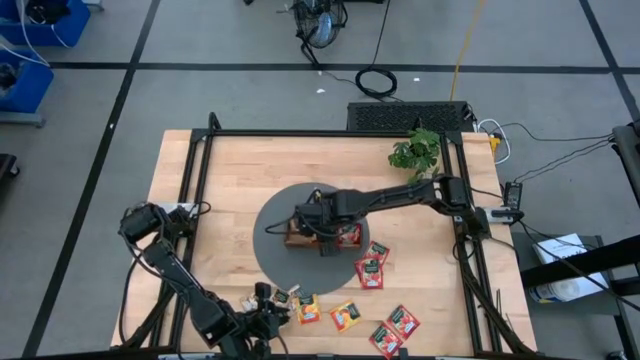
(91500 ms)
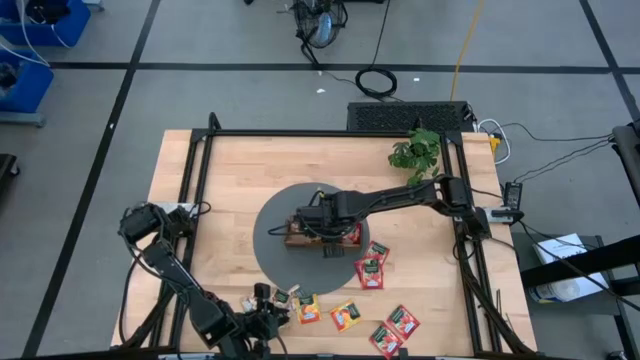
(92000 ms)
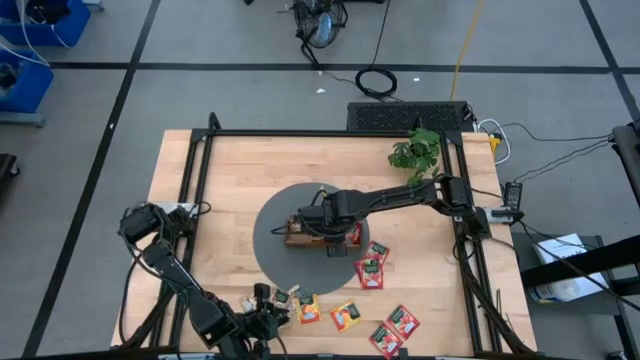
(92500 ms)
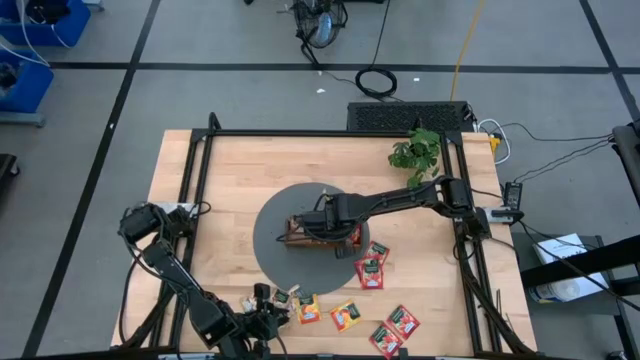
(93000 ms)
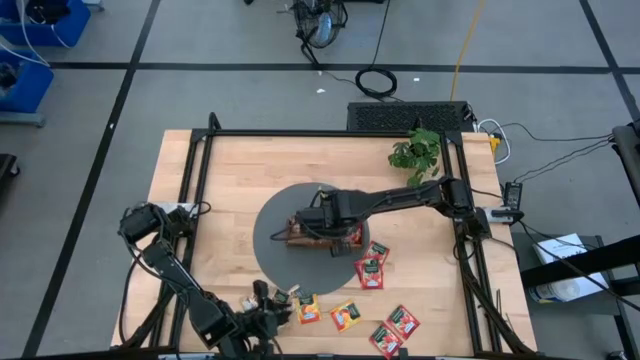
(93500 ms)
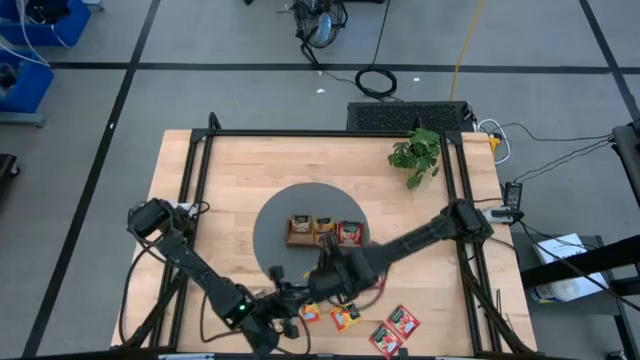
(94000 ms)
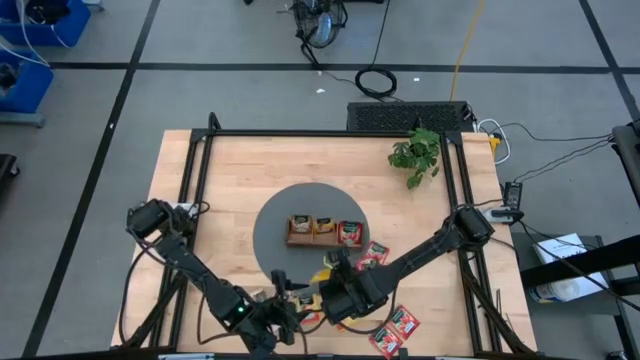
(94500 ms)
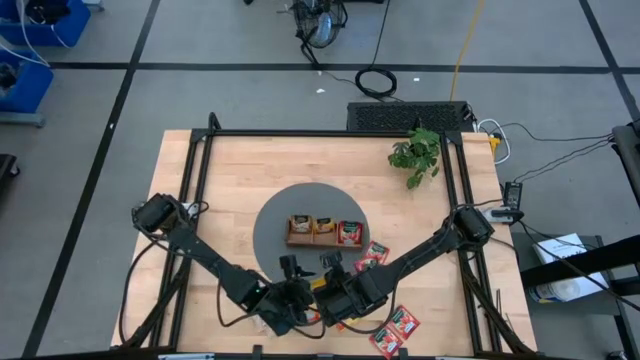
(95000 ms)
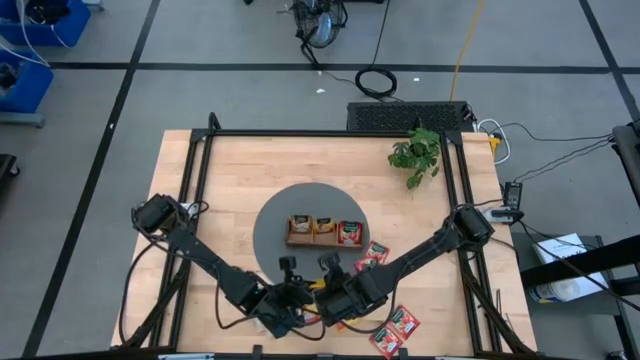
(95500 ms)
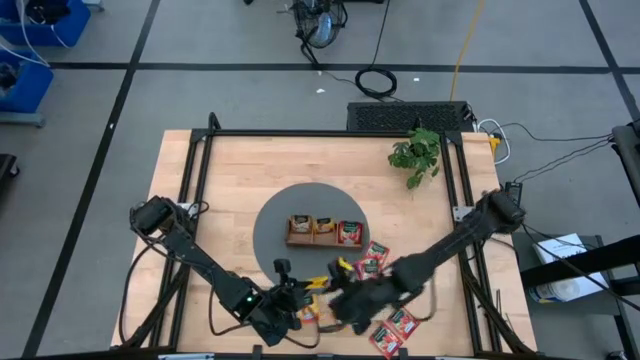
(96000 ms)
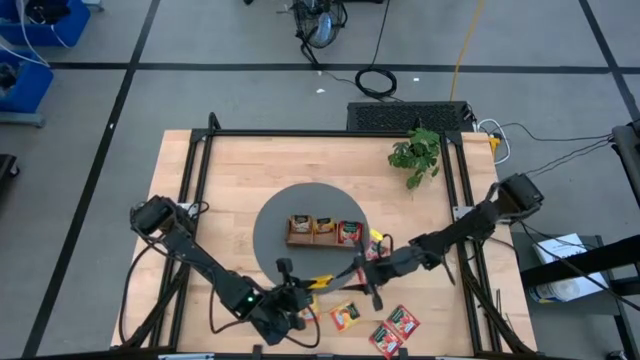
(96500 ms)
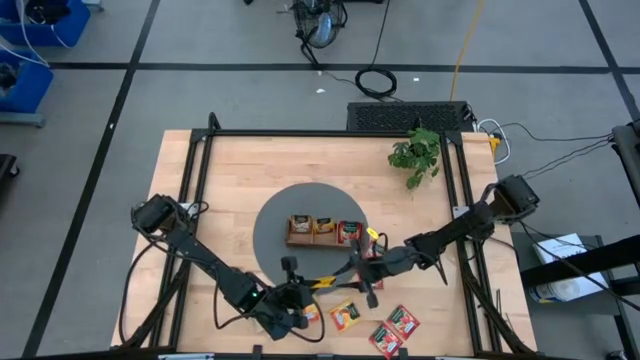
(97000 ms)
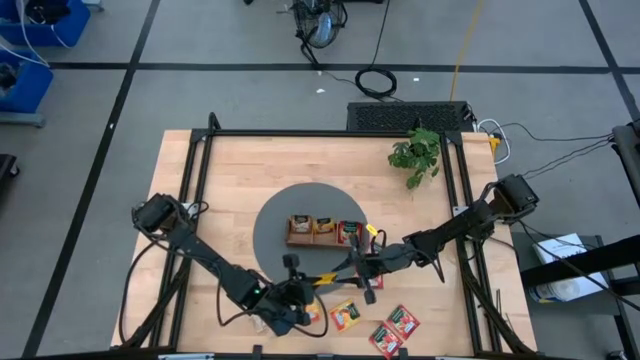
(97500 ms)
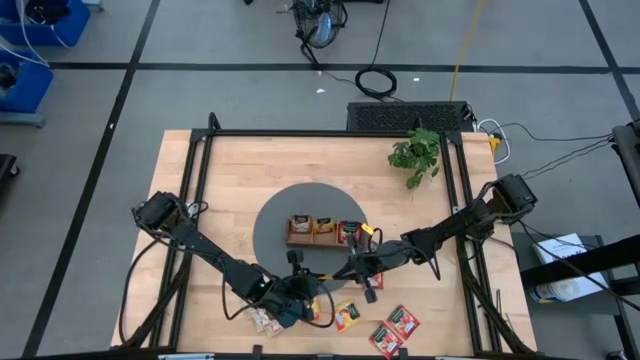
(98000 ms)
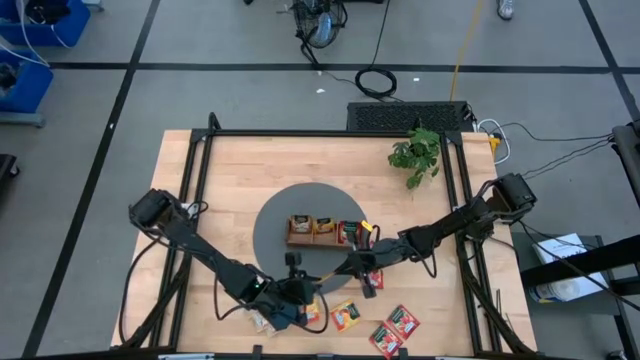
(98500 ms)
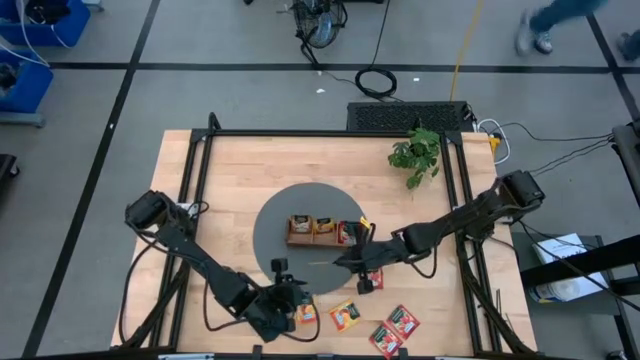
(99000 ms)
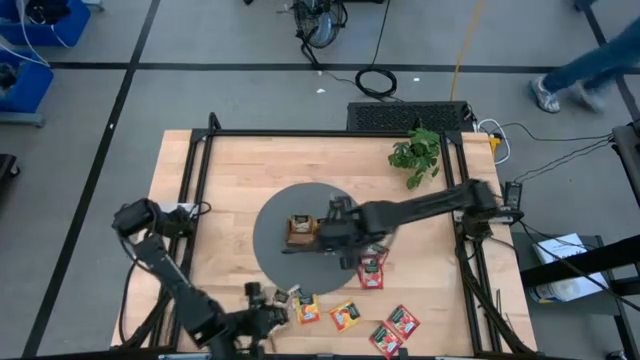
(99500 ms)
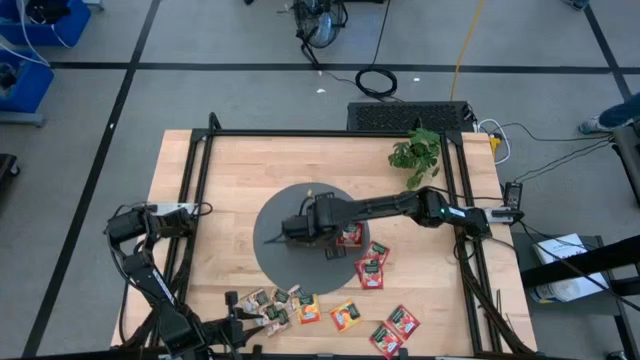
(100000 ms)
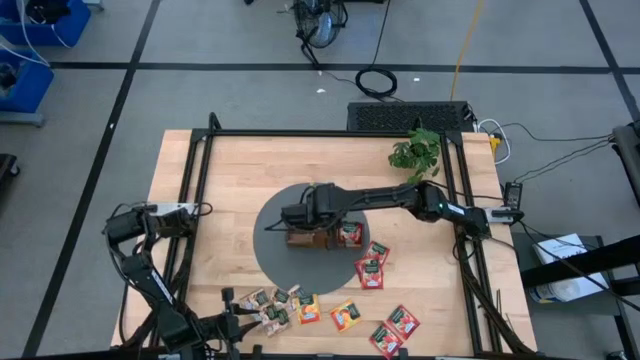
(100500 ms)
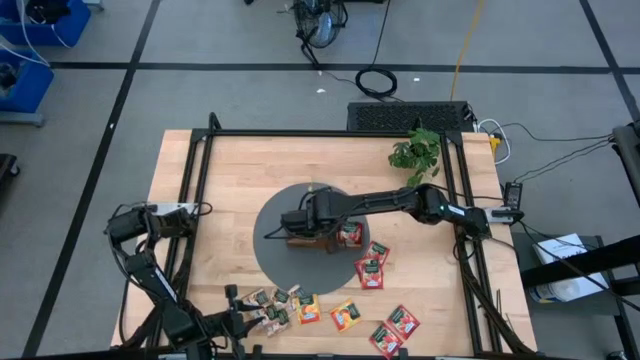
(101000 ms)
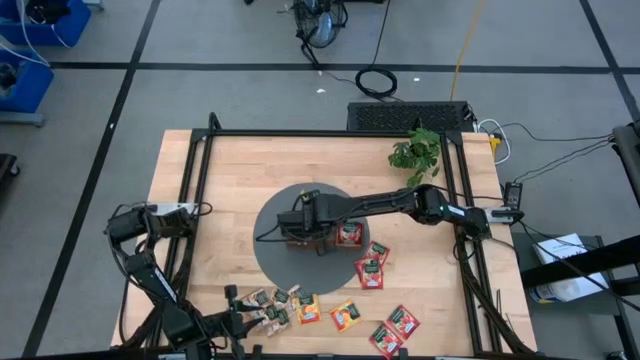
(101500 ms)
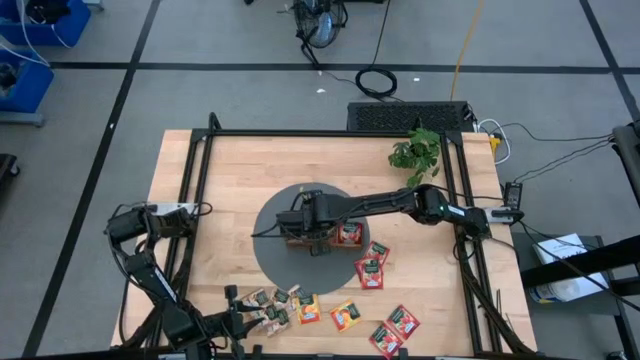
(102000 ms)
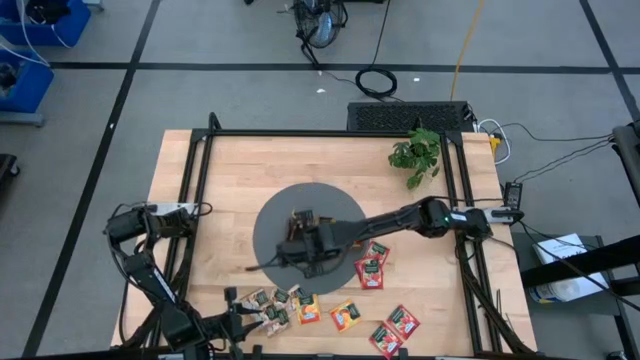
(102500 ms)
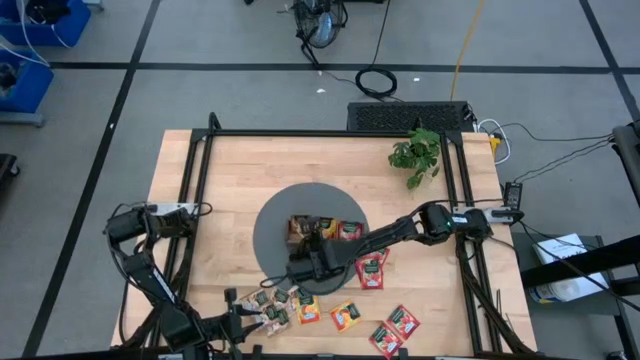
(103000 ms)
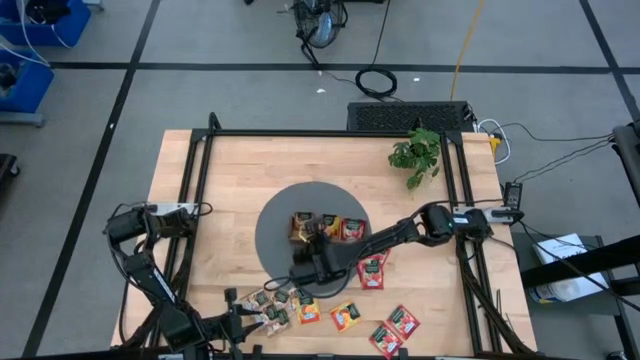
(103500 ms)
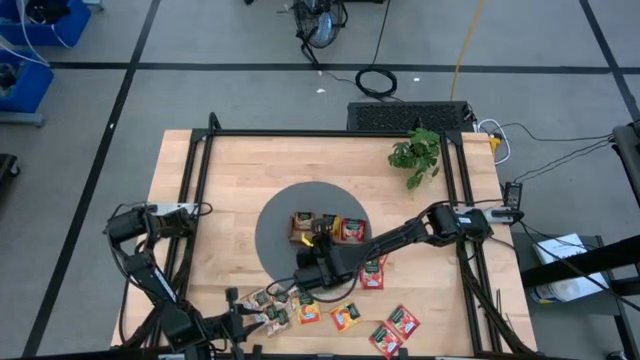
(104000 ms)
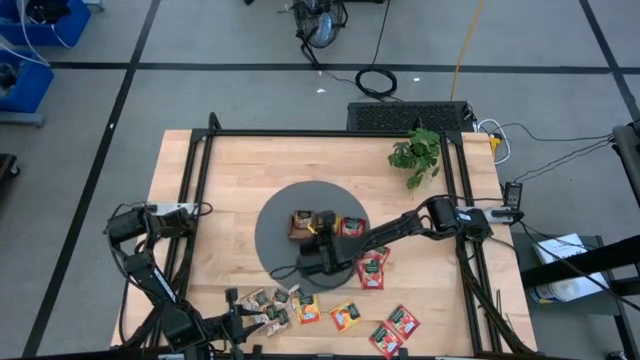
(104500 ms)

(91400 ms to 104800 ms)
Task: Pick & Place Tea
Put the middle yellow tea sachet into the middle section of the wooden organizer

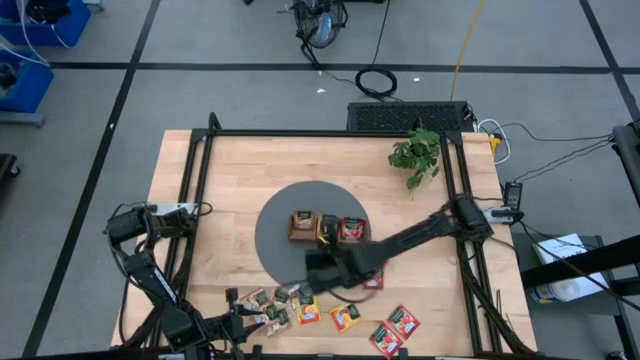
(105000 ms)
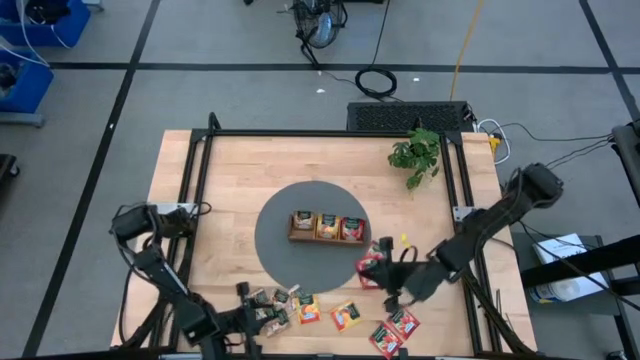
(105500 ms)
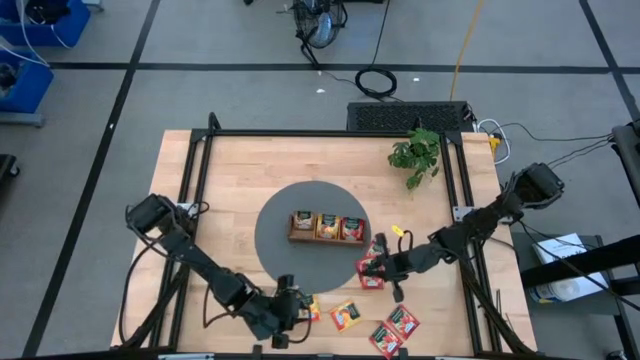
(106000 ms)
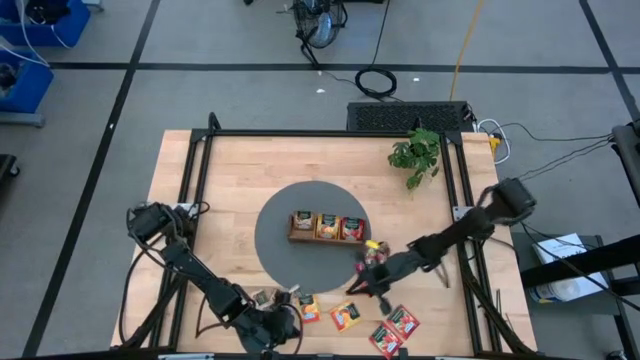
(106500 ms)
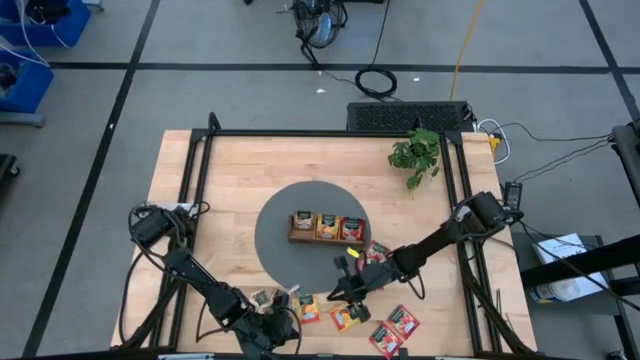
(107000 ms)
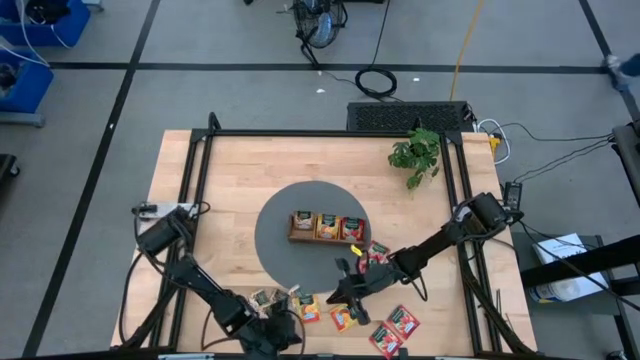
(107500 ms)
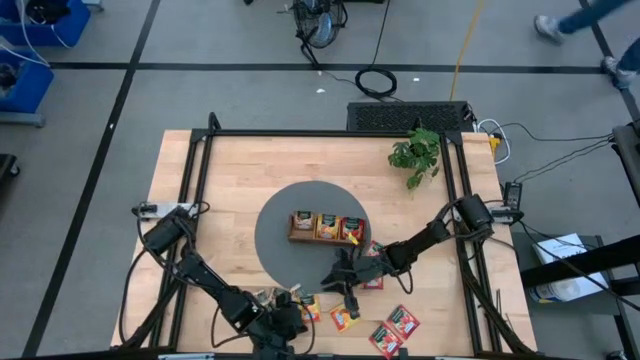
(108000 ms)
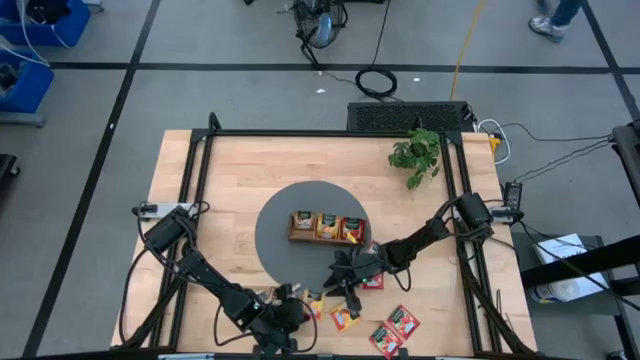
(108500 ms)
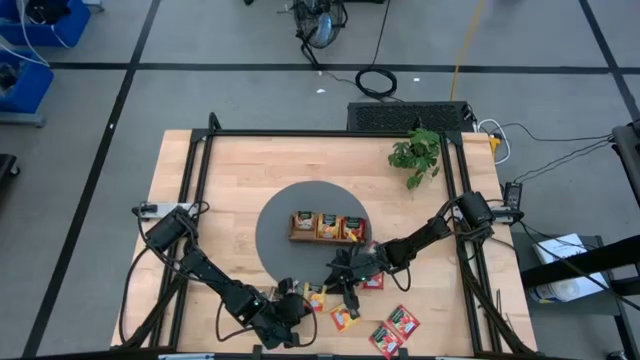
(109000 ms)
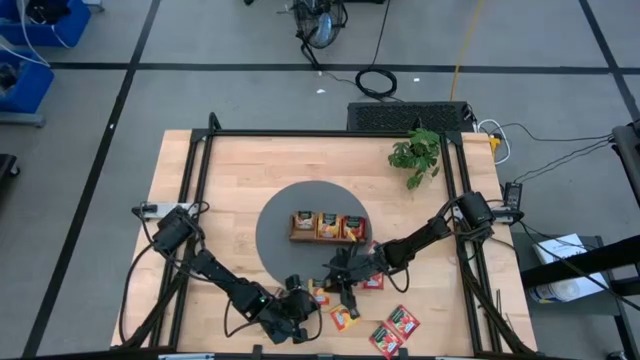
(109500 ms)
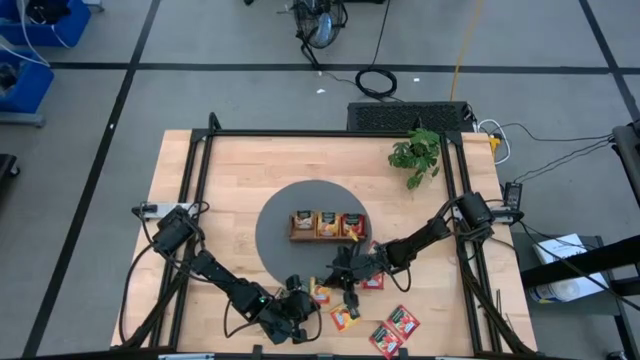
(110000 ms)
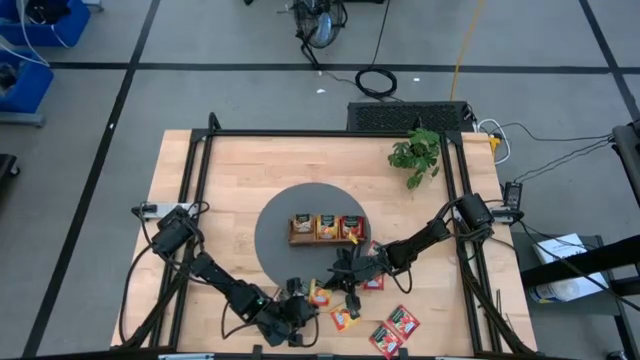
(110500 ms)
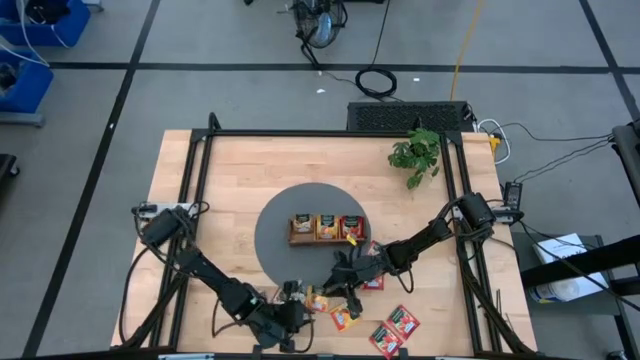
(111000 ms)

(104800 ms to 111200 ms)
Put the light brown tea sachet into the left section of the wooden organizer
